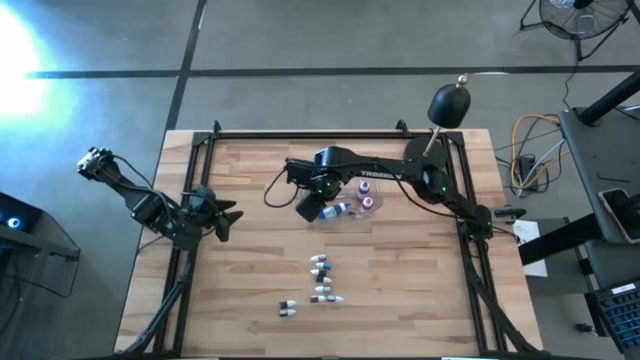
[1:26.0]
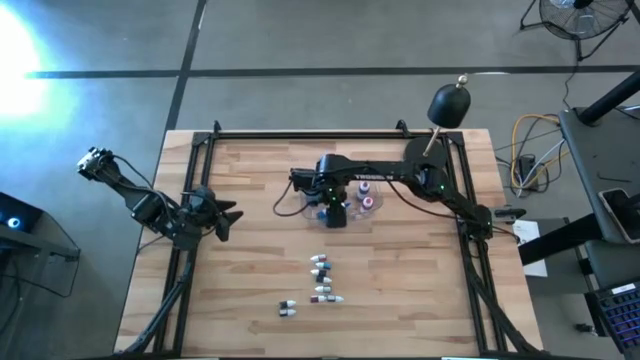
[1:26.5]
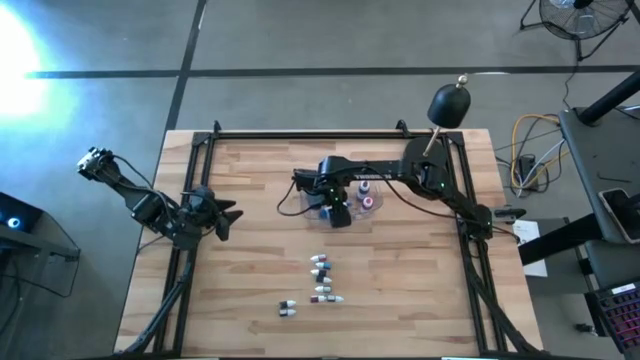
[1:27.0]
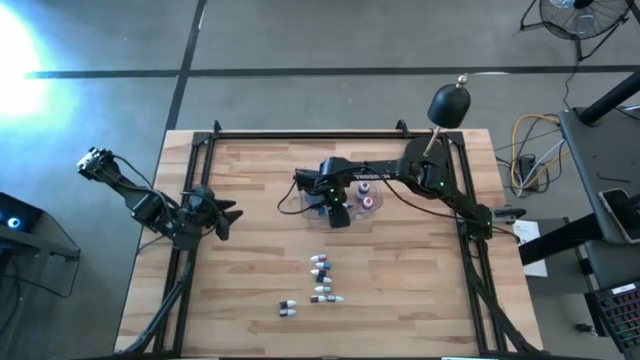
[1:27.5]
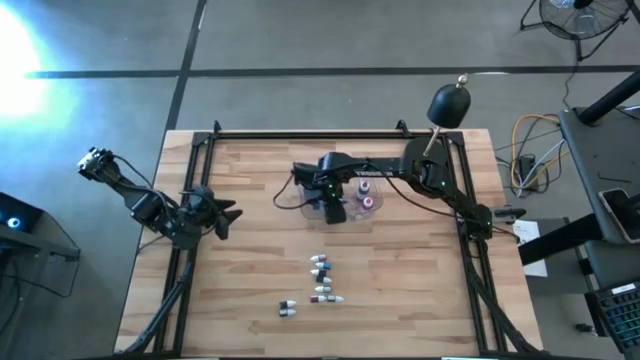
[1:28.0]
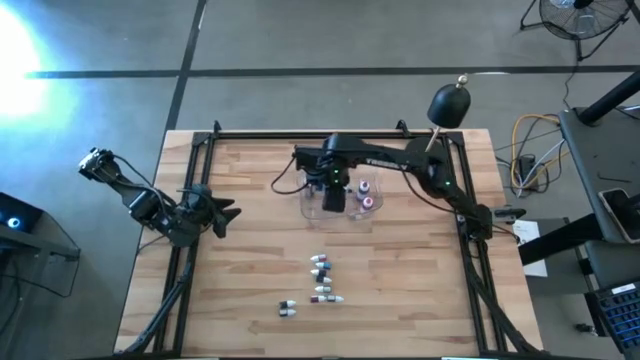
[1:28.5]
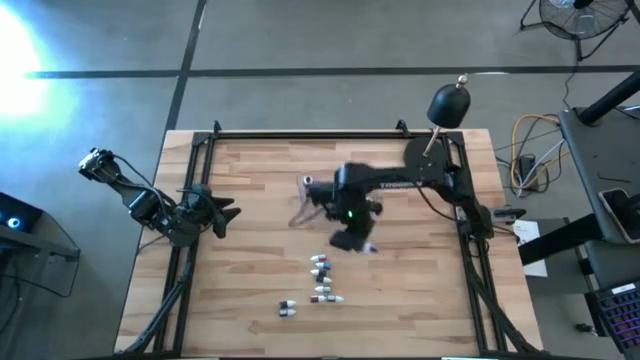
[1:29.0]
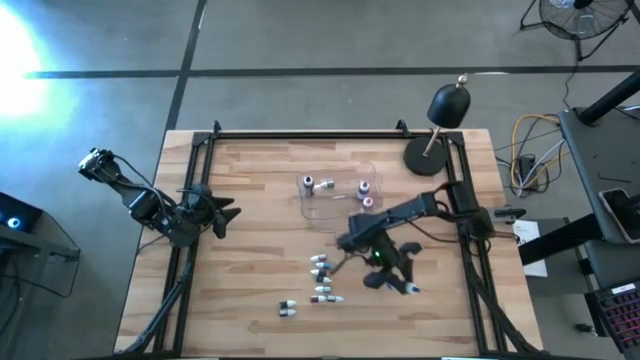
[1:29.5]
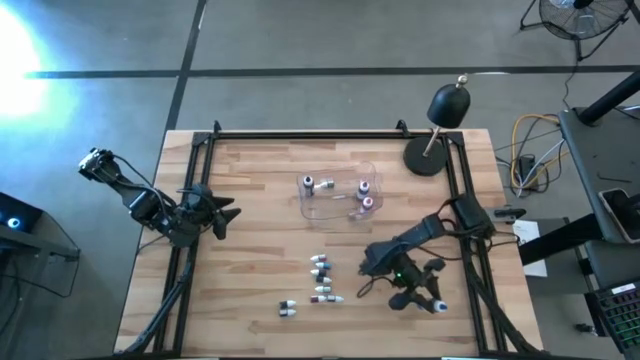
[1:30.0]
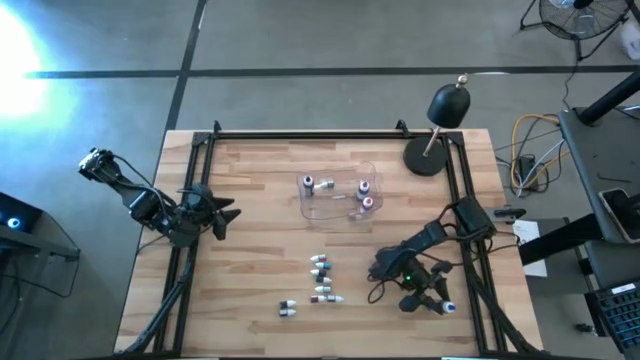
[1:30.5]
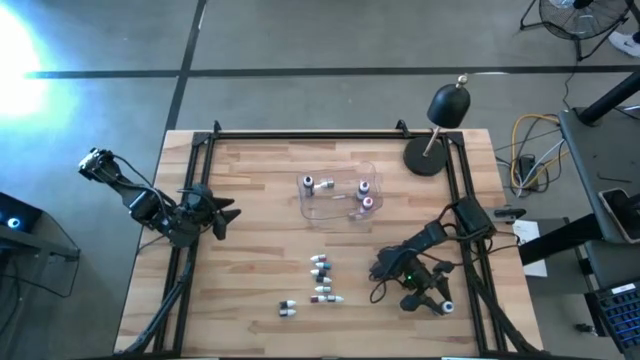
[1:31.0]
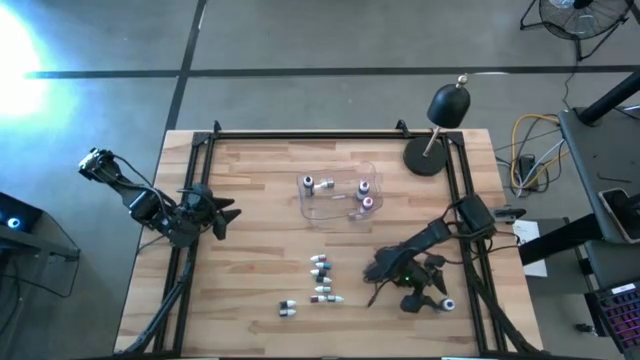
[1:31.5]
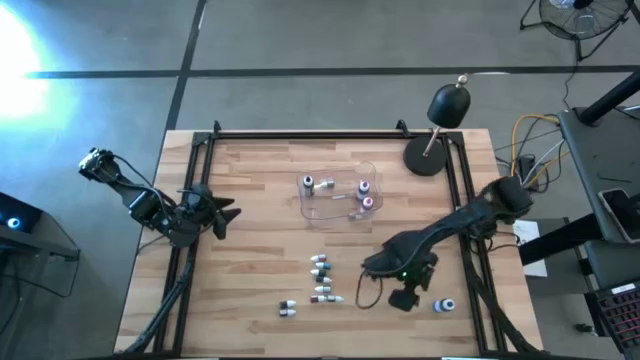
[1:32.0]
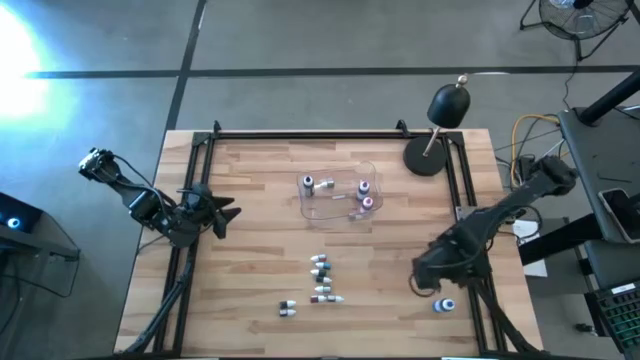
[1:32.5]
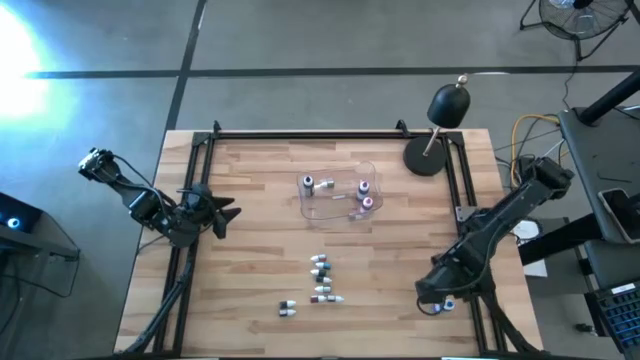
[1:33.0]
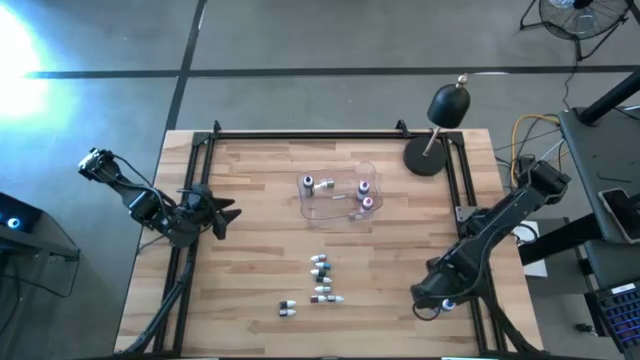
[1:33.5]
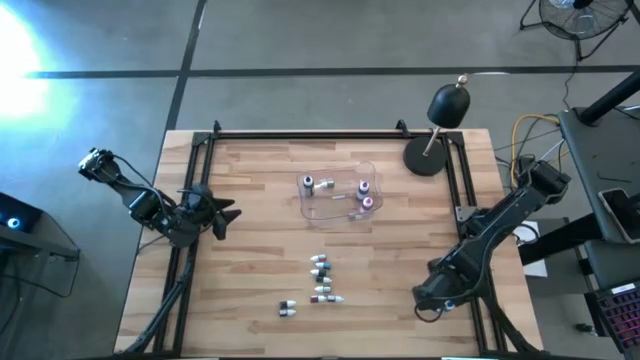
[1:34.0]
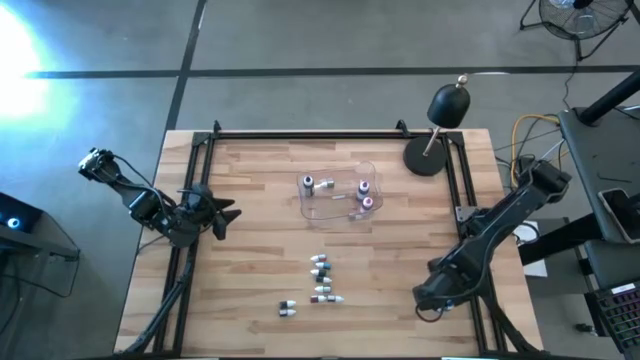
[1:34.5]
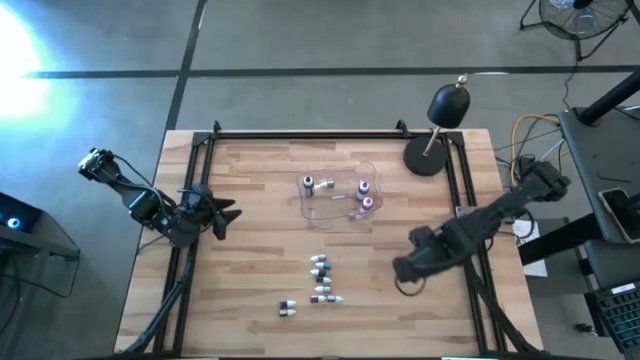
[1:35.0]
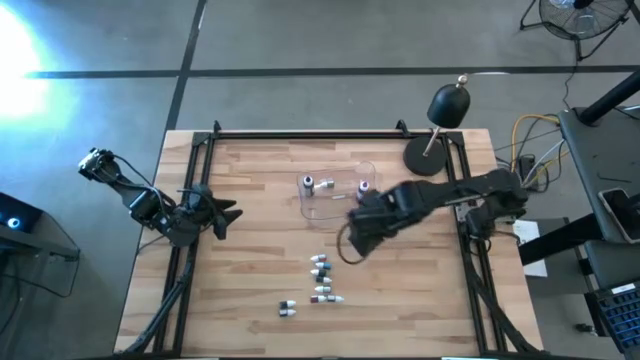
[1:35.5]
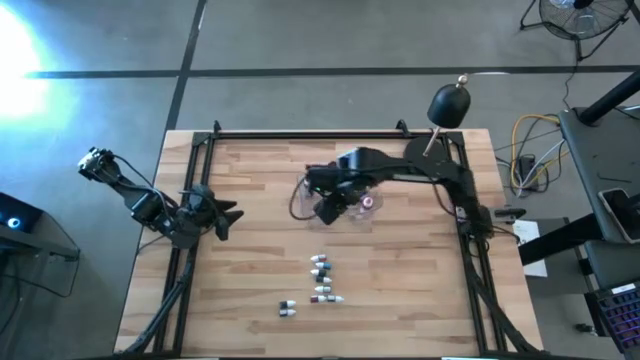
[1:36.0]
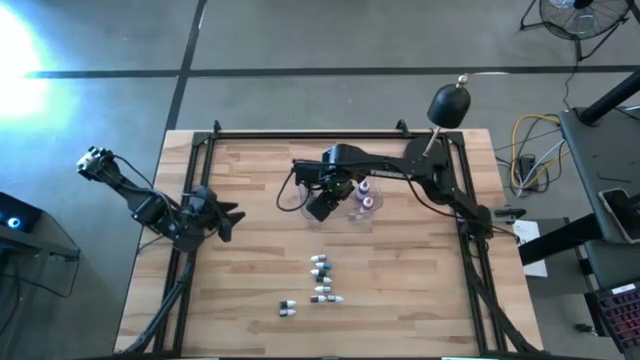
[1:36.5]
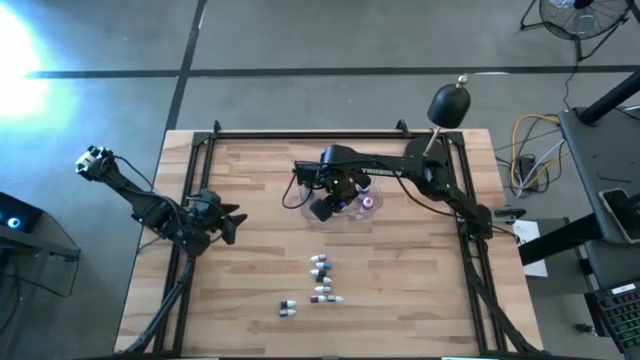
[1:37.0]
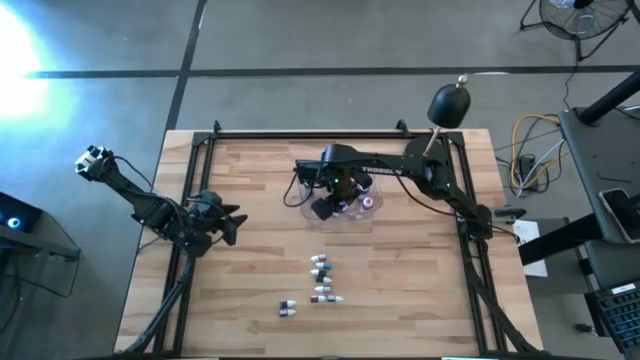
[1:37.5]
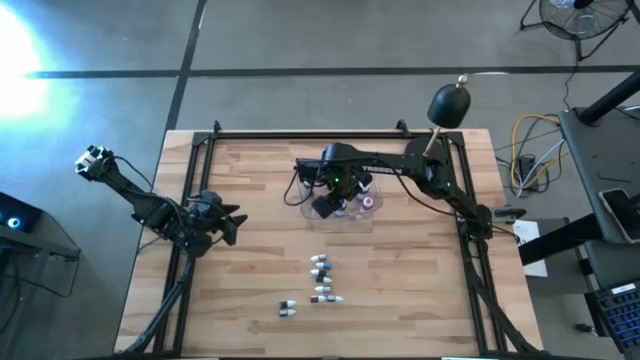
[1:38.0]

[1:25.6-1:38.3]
Task: Pick & Place food coloring
Put the large blue food coloring bottle into the transparent bin

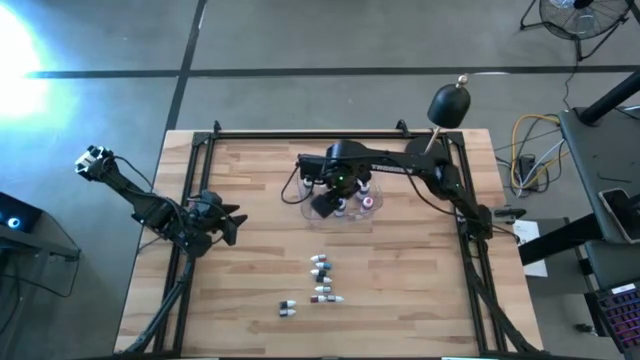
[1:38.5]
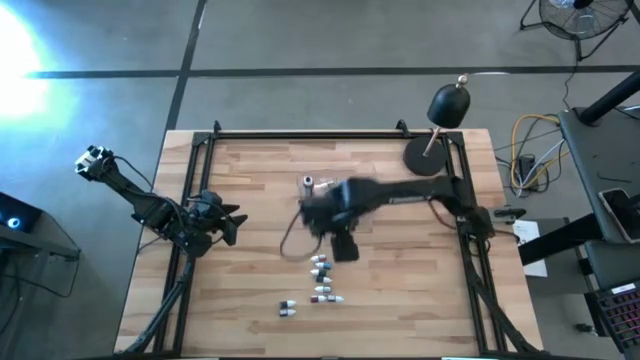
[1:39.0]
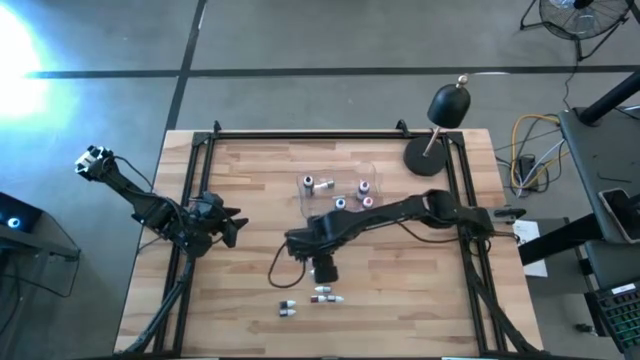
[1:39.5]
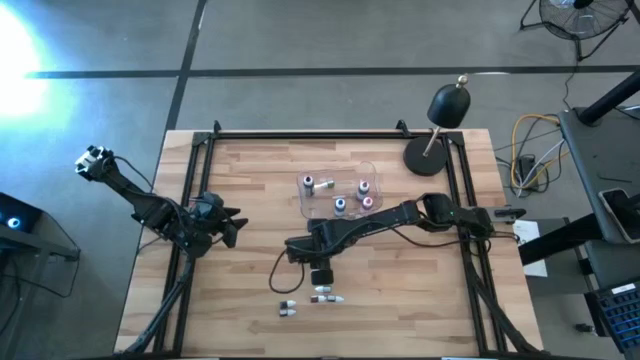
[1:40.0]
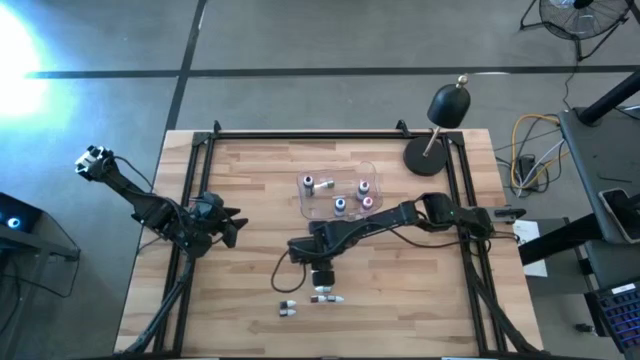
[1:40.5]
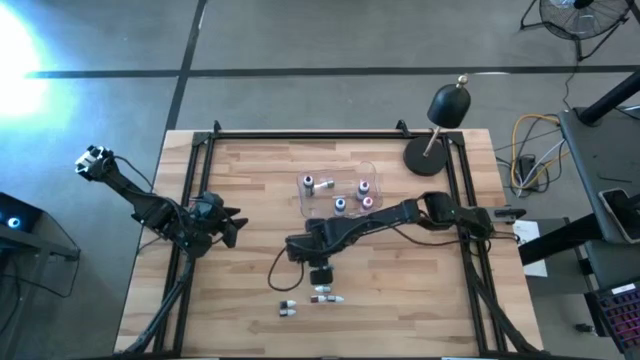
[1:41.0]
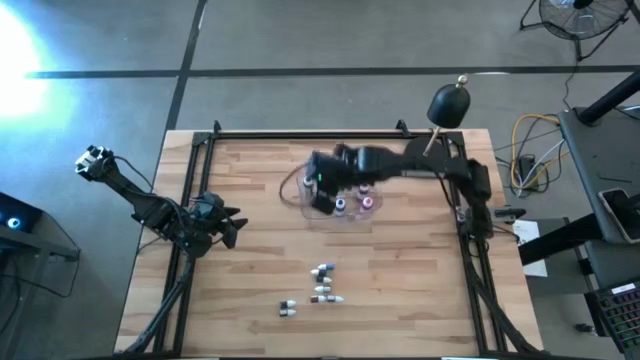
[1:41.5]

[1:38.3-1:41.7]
Put the small orange food coloring bottle into the transparent bin

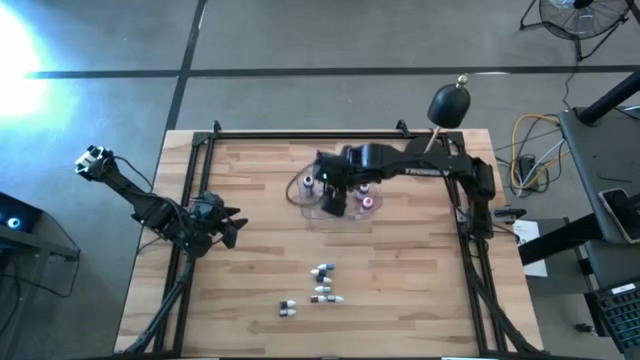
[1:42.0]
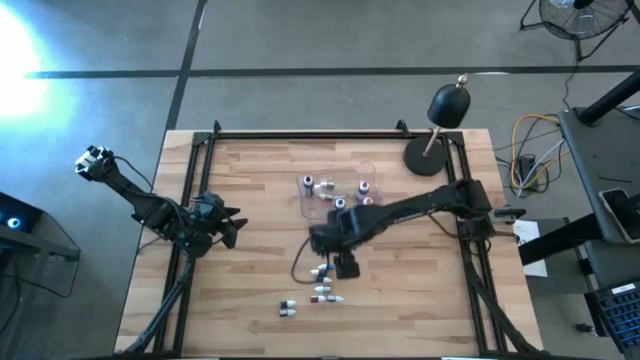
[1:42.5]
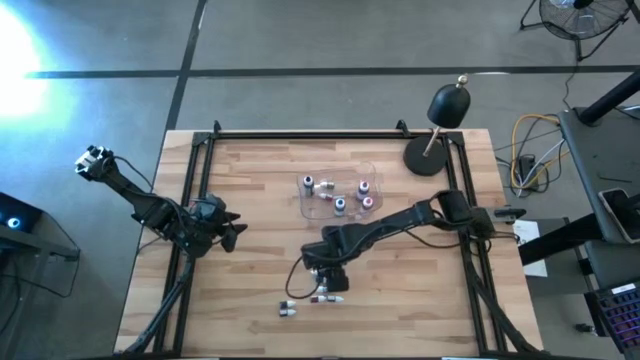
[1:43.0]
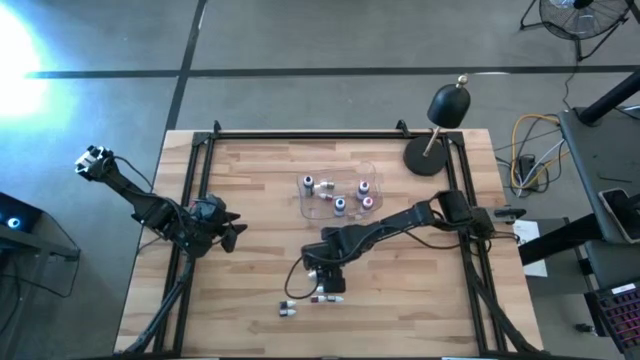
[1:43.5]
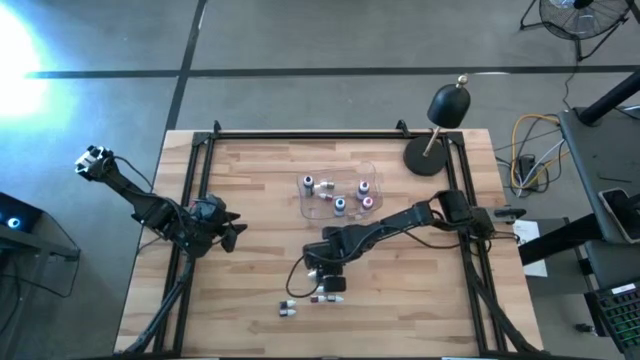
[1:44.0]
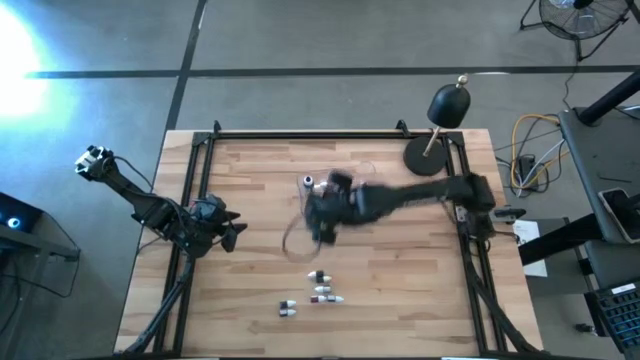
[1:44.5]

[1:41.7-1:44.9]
Put the top small blue food coloring bottle into the transparent bin
